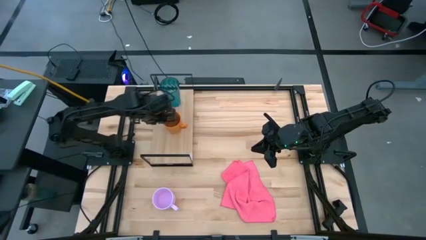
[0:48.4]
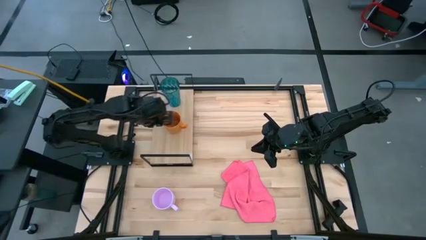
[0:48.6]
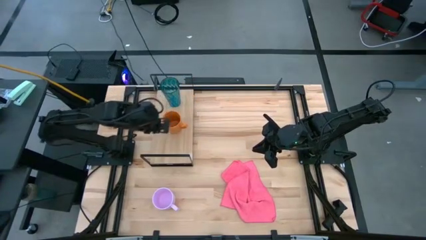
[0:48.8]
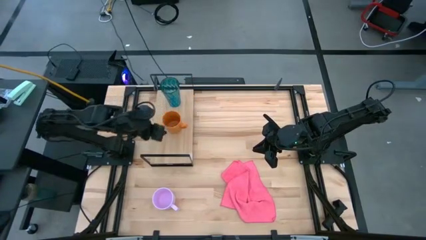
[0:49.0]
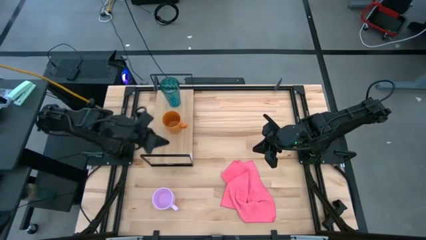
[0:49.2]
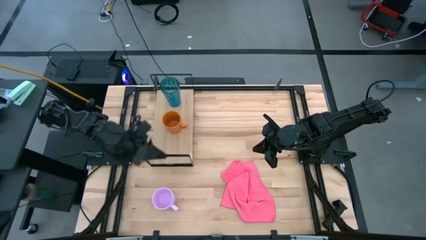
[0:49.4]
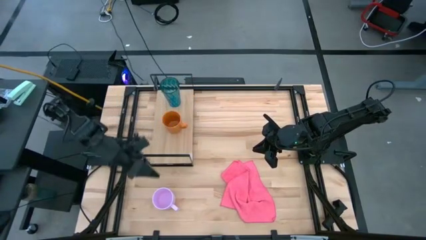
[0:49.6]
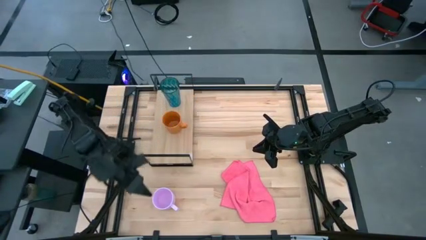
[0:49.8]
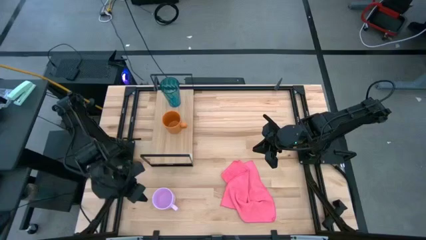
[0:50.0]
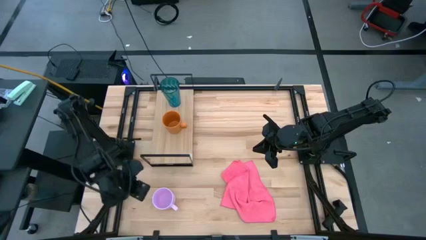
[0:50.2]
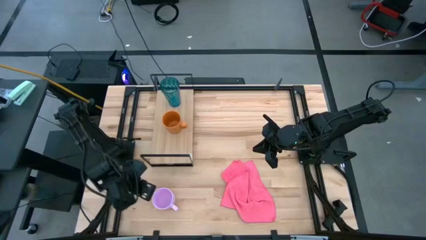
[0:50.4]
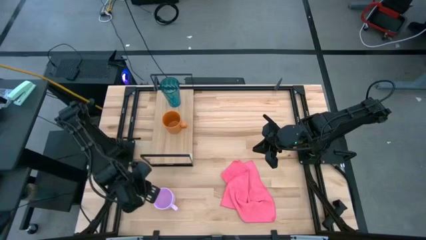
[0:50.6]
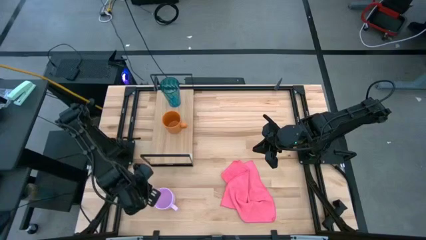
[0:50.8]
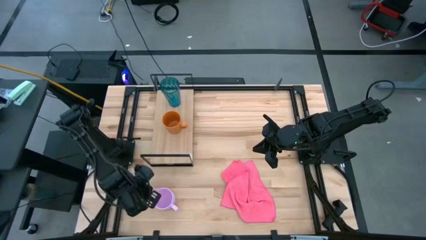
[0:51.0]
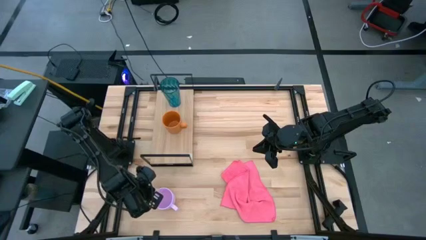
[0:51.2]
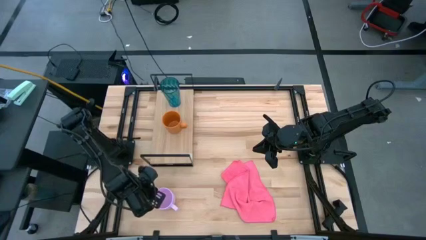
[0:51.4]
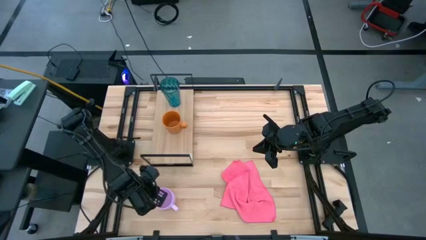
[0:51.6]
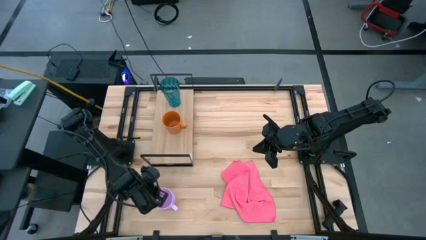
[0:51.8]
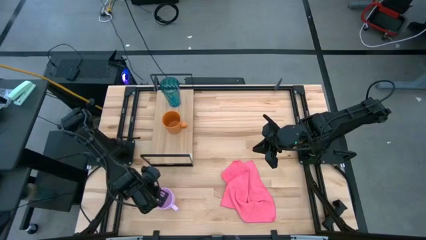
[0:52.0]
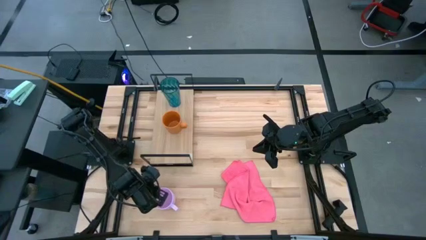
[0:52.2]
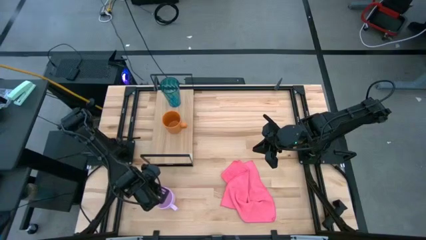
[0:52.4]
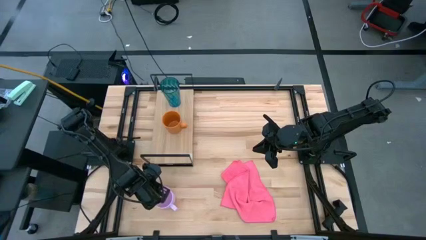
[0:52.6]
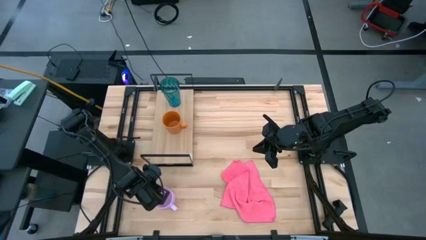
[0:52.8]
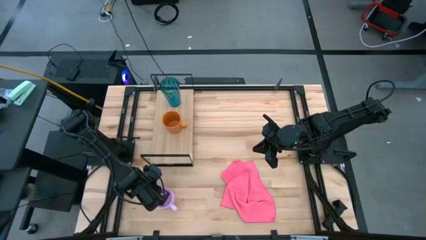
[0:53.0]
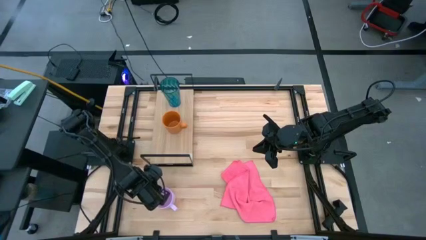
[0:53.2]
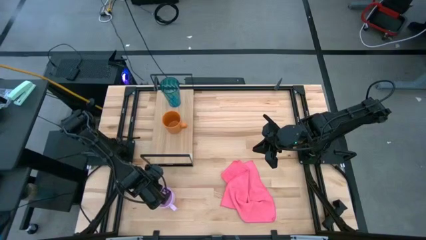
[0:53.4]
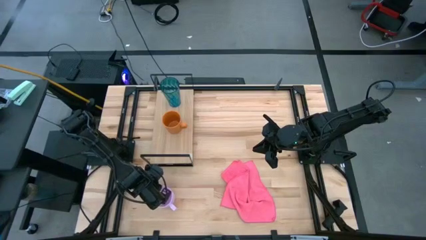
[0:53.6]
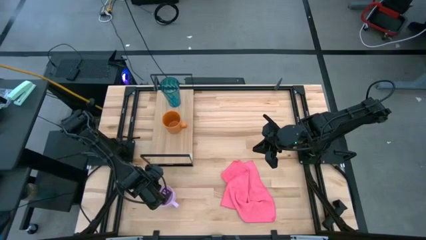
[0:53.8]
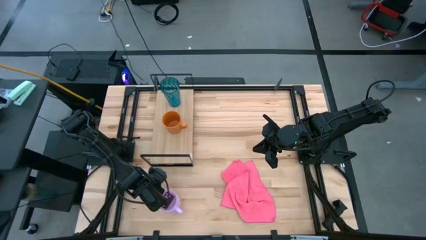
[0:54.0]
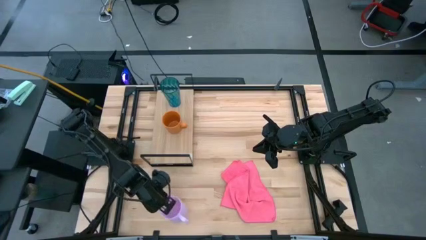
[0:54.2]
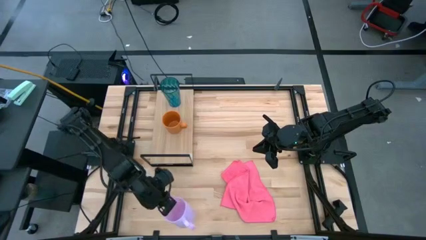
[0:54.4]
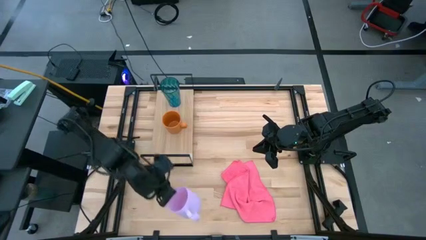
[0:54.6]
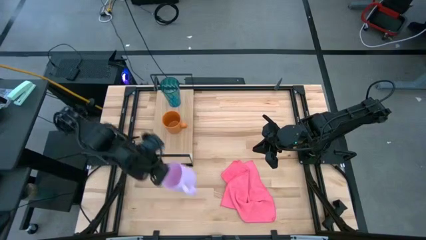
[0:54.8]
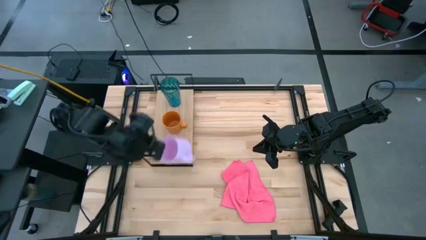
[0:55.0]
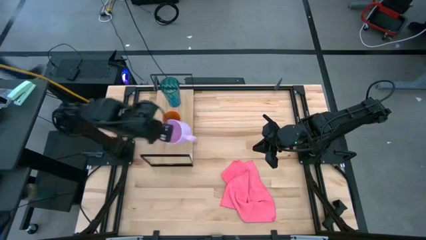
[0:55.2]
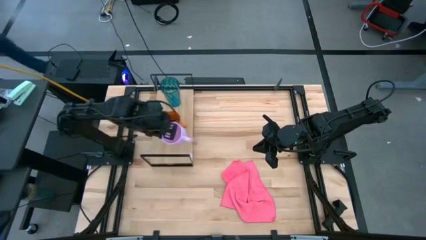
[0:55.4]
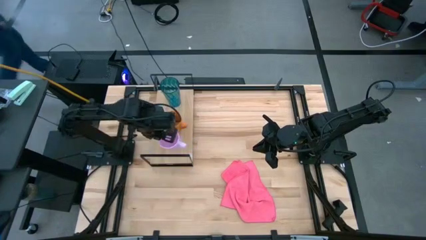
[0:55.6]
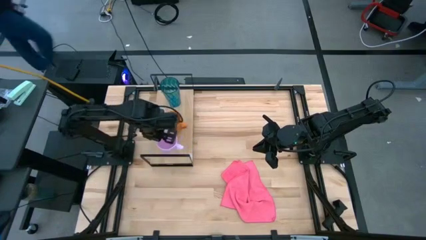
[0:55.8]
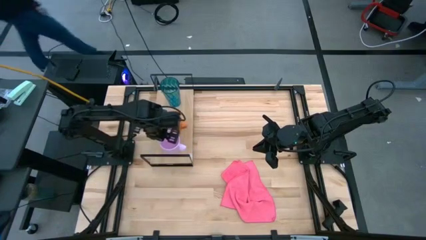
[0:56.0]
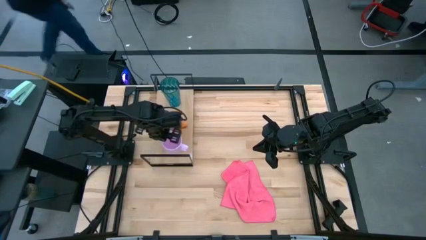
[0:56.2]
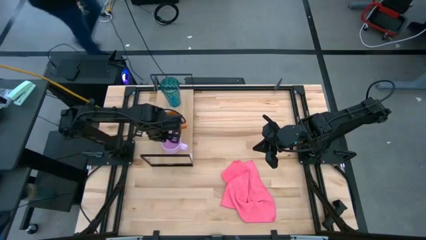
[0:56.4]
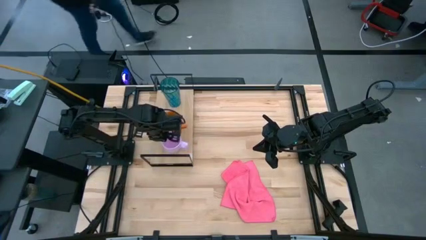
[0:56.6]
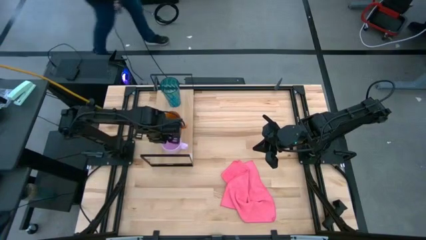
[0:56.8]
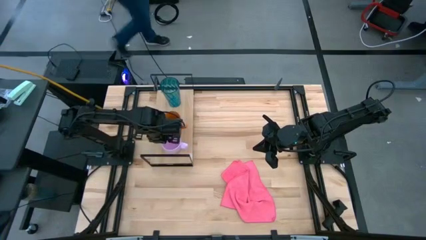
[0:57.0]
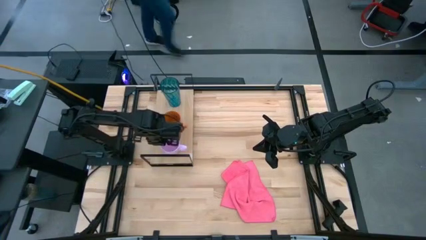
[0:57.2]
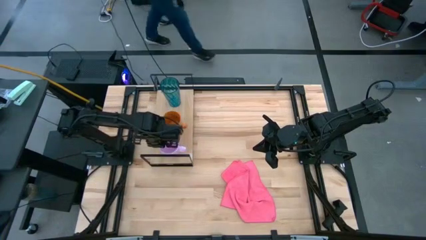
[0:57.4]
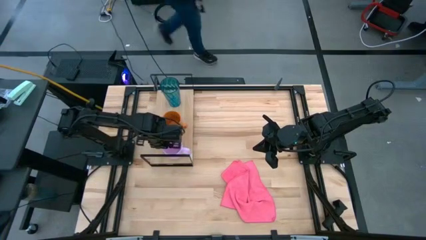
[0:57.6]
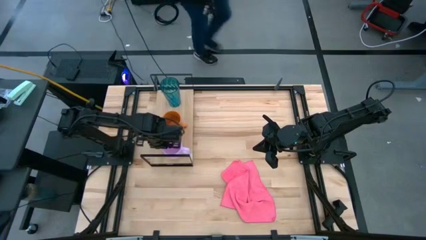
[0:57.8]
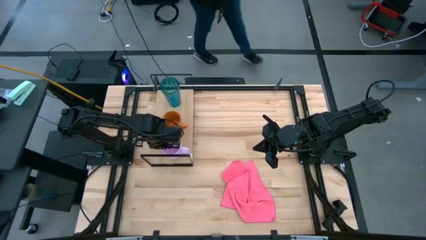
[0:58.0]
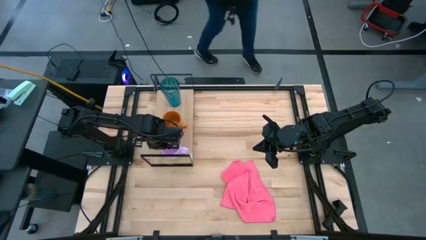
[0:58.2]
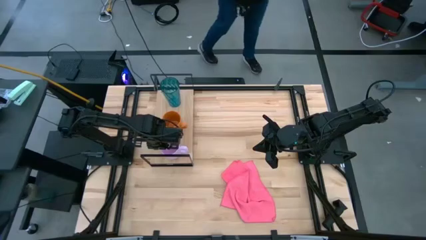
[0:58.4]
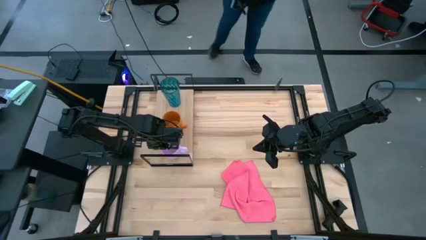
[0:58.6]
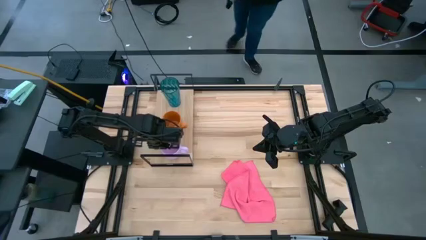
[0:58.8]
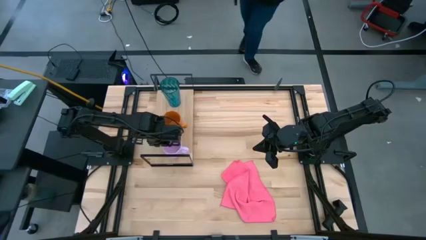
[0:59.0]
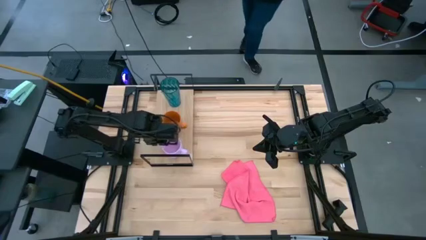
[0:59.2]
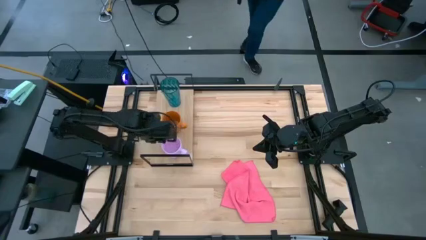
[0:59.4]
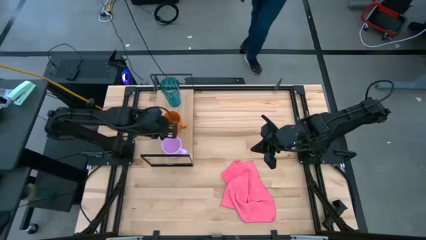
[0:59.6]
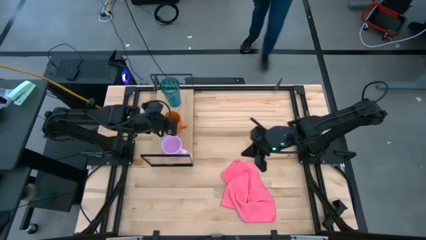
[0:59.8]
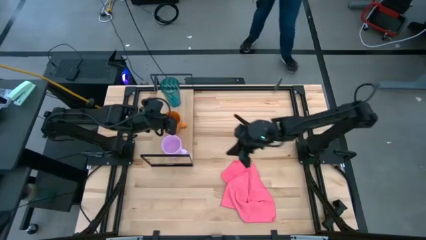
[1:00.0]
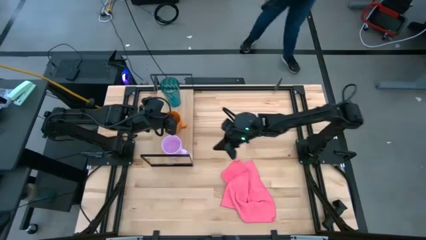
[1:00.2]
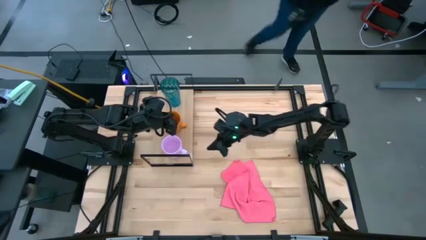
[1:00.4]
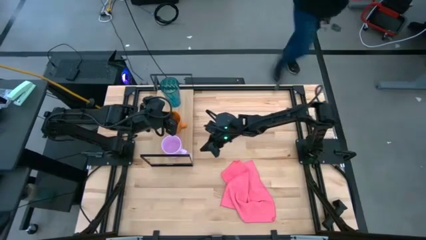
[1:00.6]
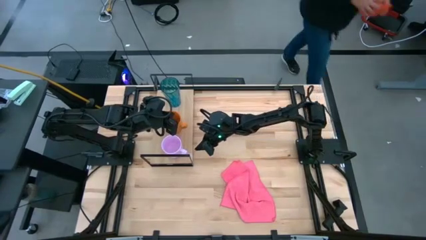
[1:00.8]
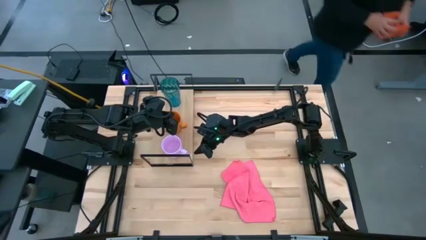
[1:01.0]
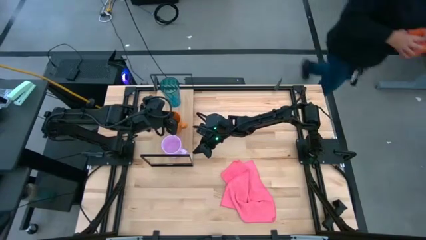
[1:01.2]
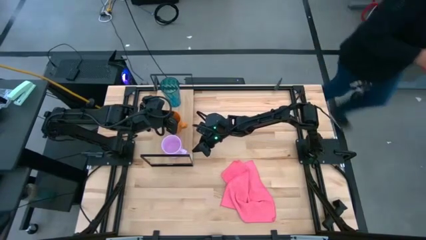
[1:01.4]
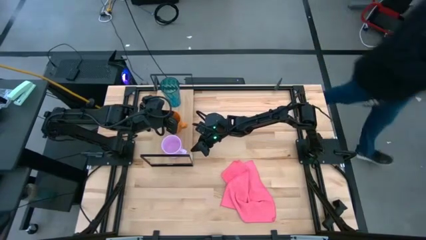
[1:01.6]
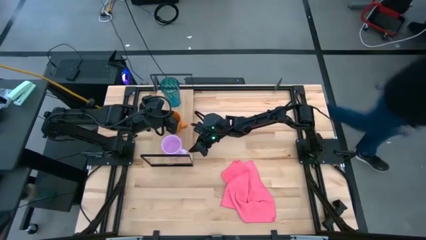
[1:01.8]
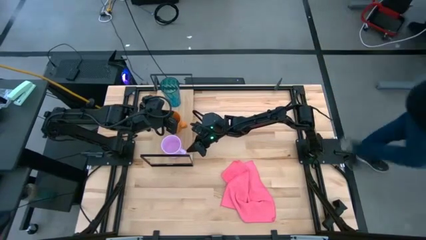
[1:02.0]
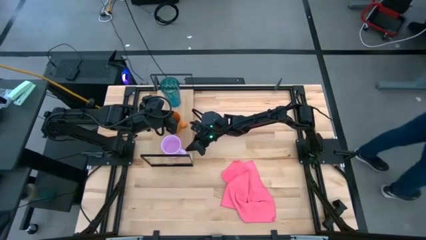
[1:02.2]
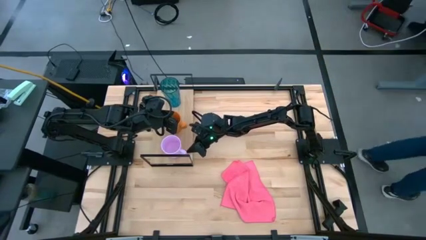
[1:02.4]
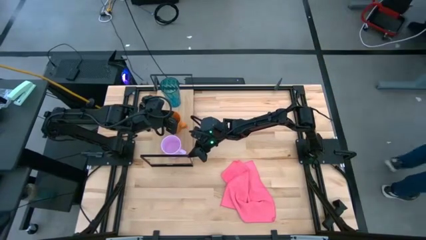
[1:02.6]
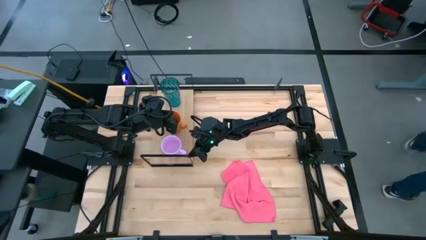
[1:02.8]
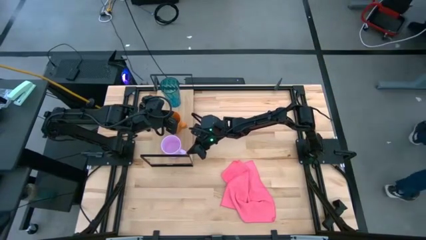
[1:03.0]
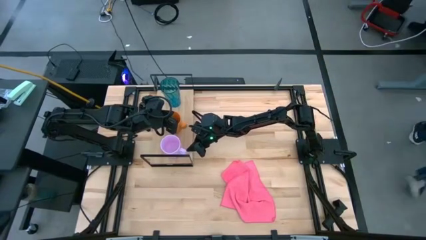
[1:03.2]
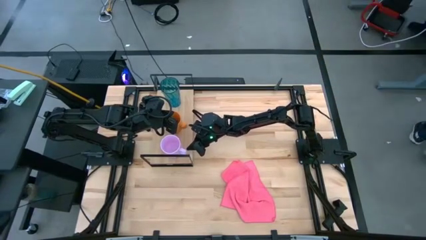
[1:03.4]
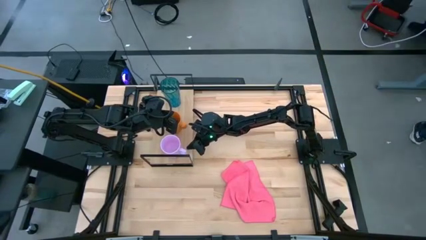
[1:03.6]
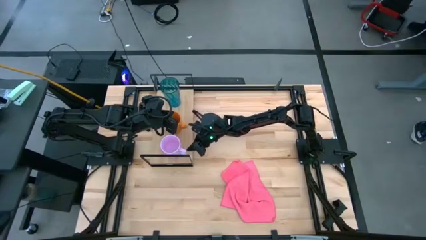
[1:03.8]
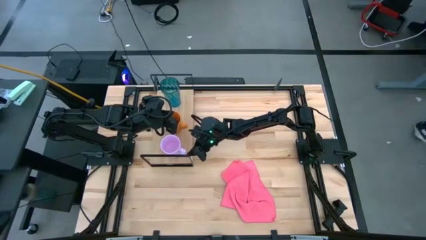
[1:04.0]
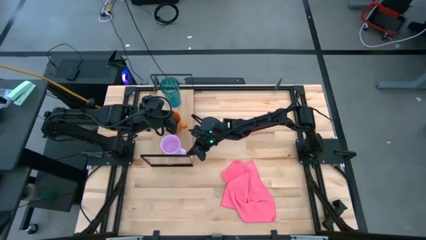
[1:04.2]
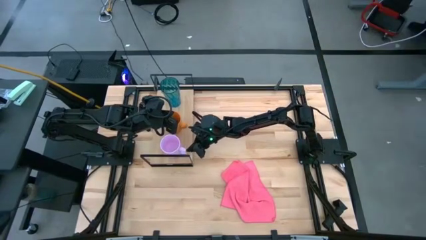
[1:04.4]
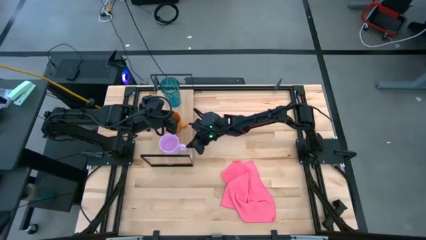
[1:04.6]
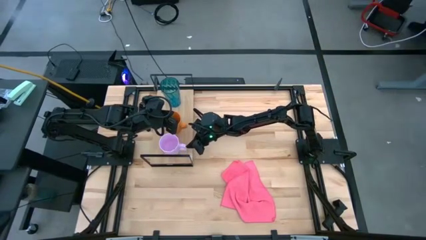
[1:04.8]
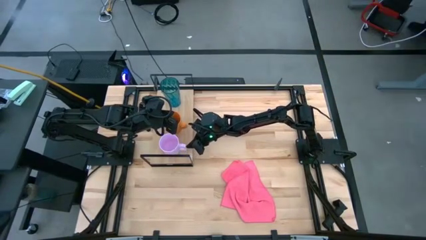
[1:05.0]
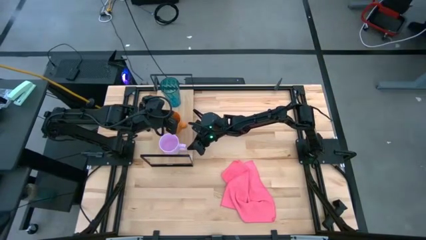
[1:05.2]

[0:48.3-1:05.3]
Task: Stack small to large cups/mugs on shelf
Put the pink mug on the shelf
